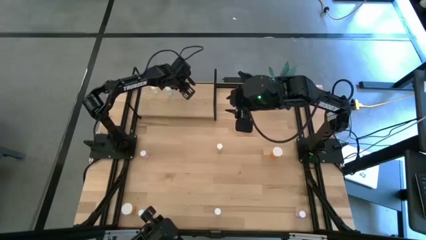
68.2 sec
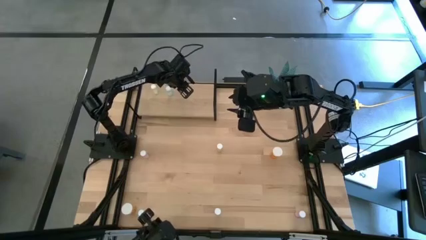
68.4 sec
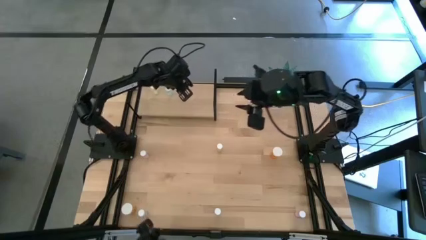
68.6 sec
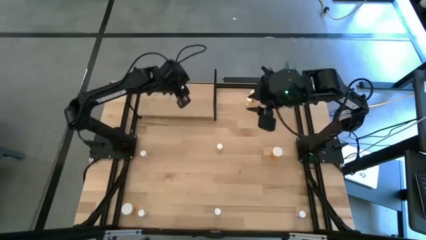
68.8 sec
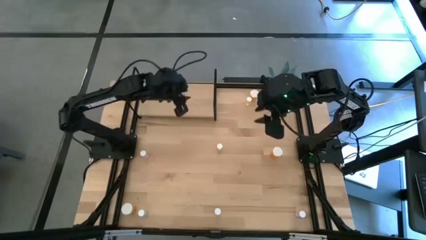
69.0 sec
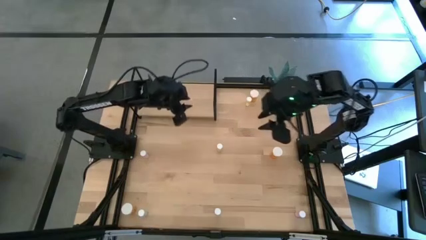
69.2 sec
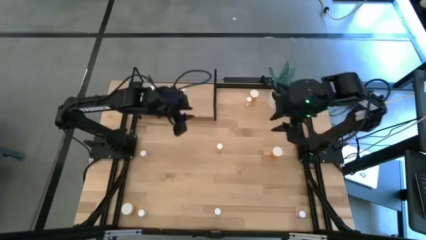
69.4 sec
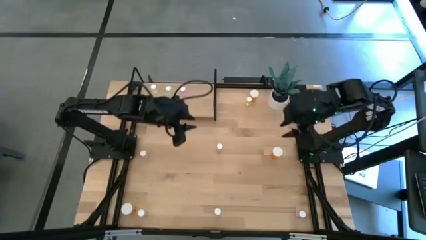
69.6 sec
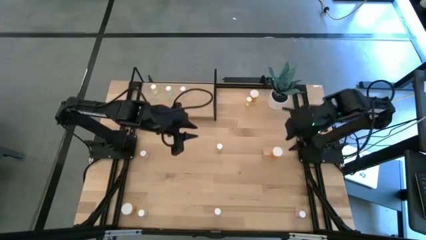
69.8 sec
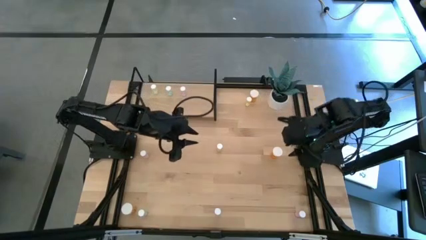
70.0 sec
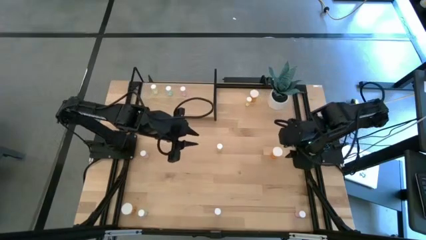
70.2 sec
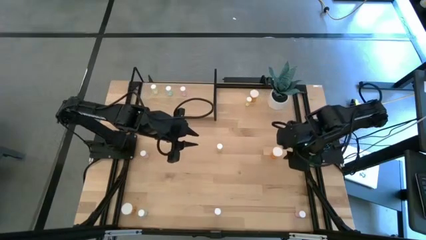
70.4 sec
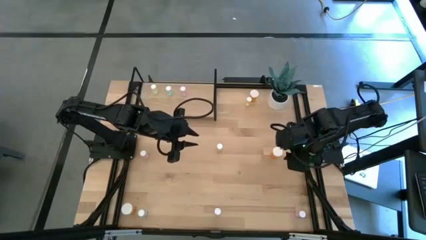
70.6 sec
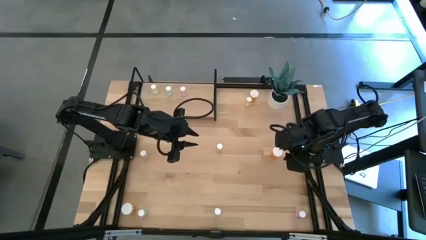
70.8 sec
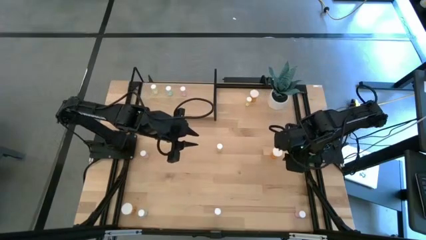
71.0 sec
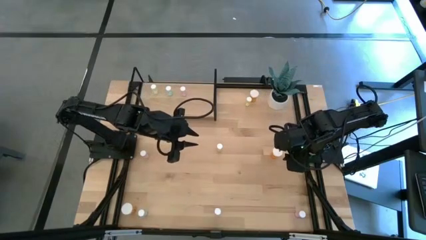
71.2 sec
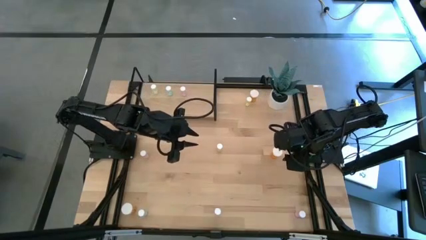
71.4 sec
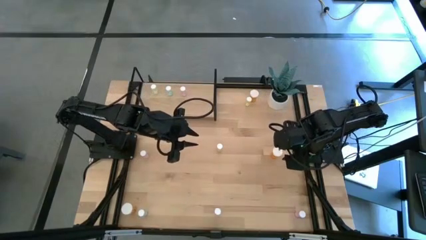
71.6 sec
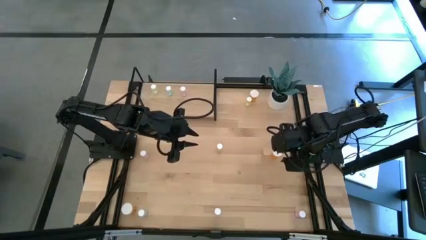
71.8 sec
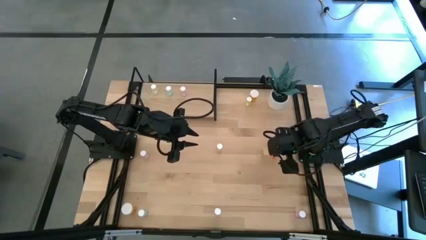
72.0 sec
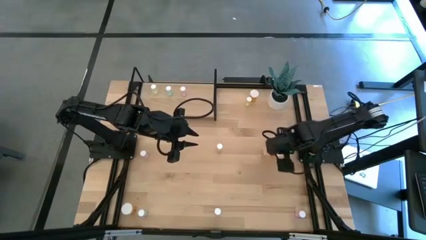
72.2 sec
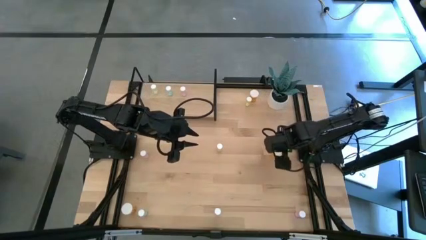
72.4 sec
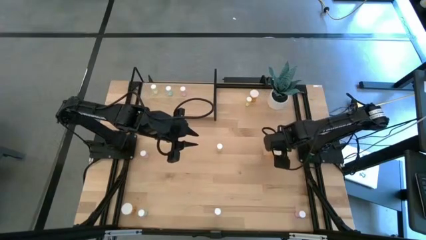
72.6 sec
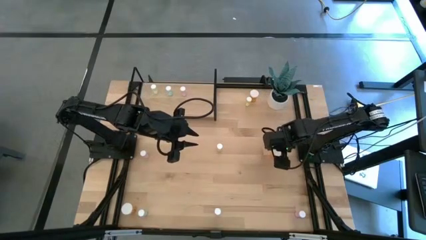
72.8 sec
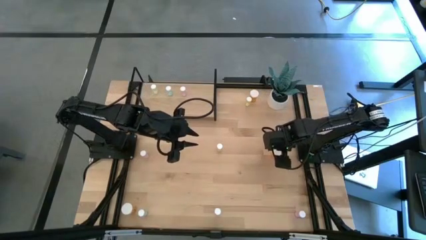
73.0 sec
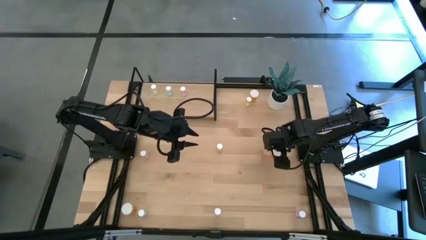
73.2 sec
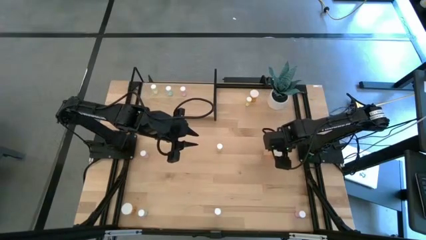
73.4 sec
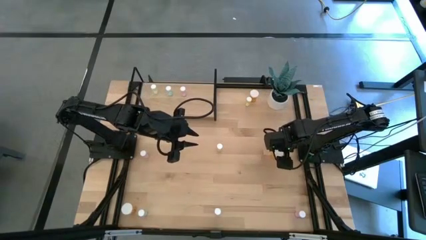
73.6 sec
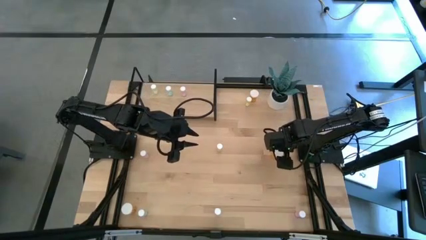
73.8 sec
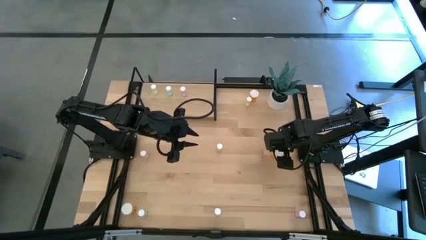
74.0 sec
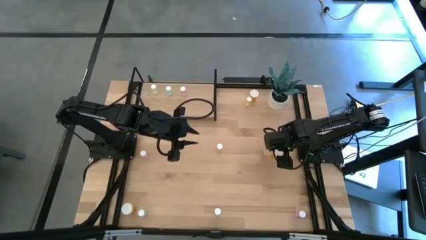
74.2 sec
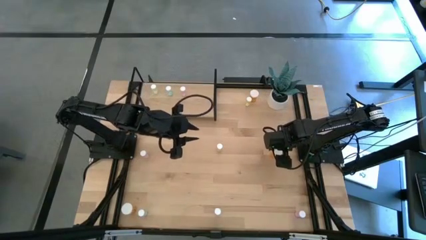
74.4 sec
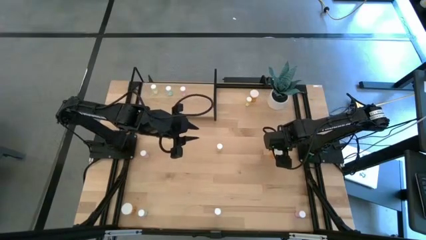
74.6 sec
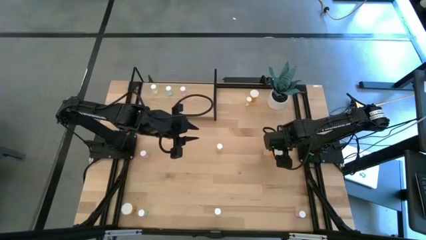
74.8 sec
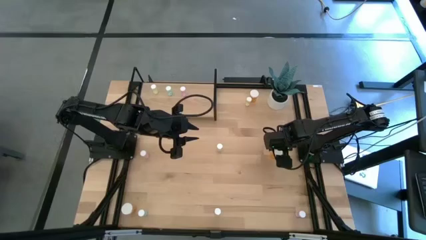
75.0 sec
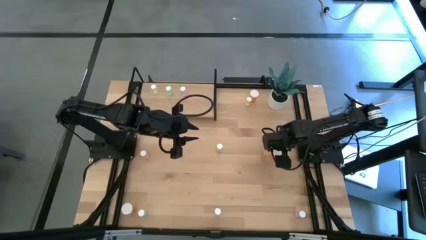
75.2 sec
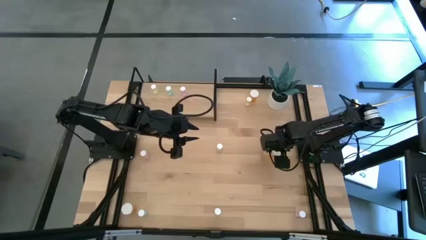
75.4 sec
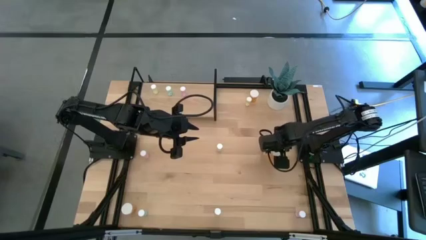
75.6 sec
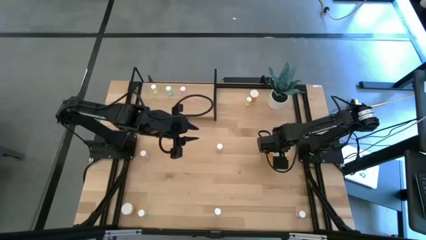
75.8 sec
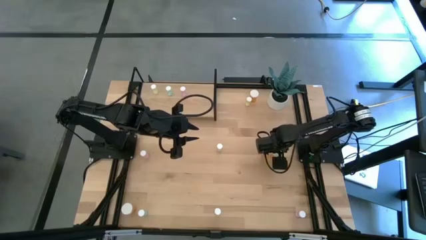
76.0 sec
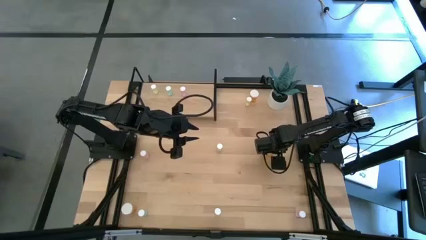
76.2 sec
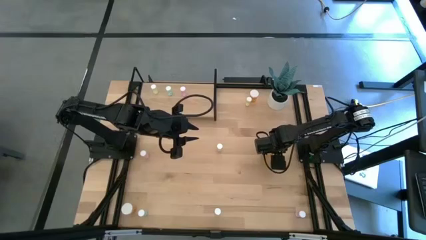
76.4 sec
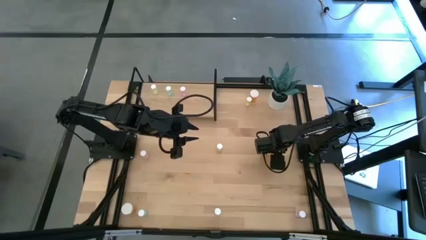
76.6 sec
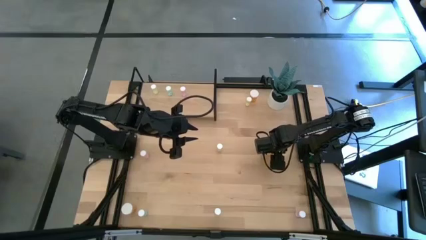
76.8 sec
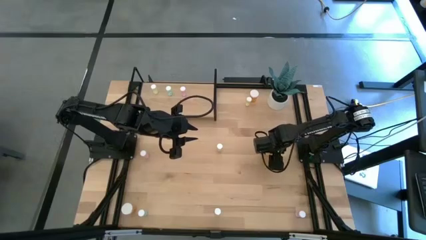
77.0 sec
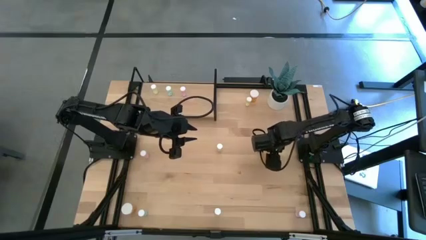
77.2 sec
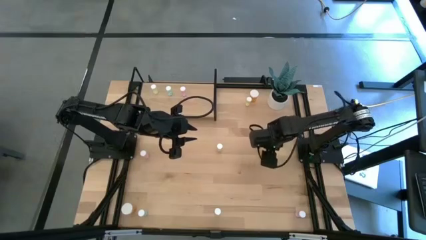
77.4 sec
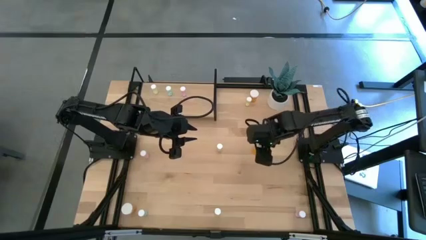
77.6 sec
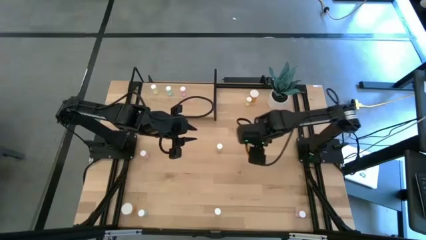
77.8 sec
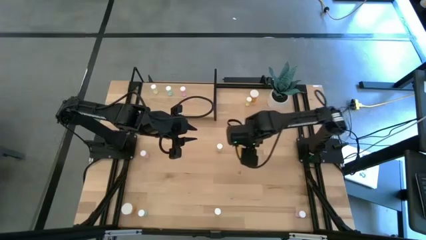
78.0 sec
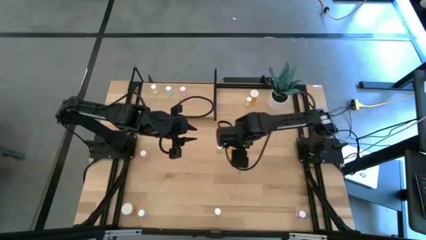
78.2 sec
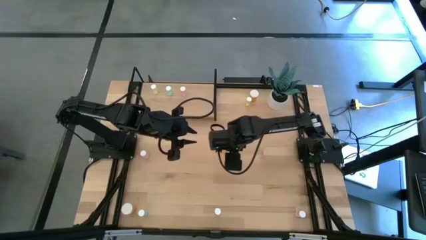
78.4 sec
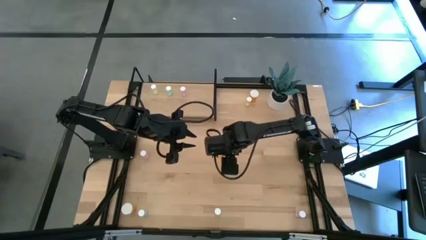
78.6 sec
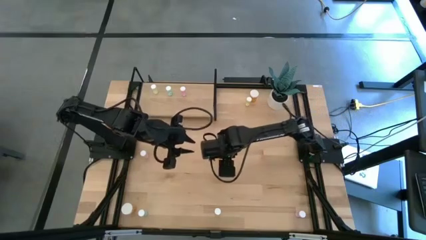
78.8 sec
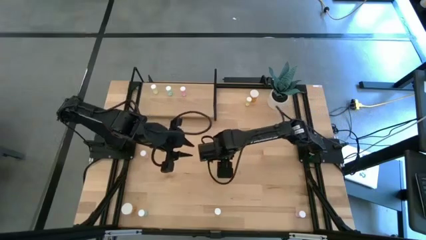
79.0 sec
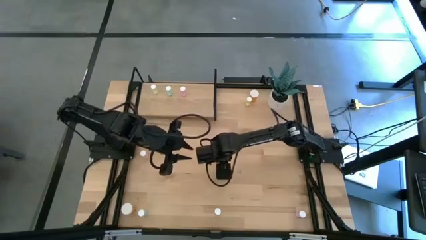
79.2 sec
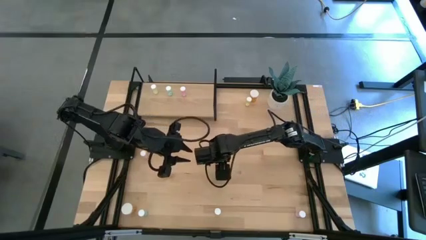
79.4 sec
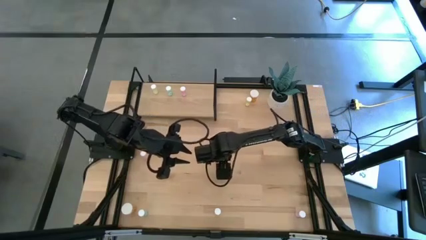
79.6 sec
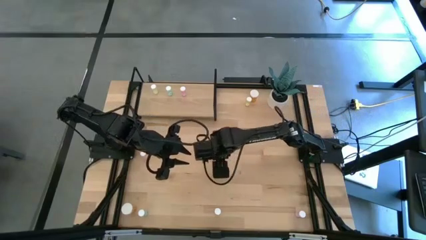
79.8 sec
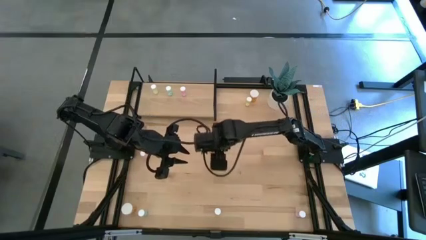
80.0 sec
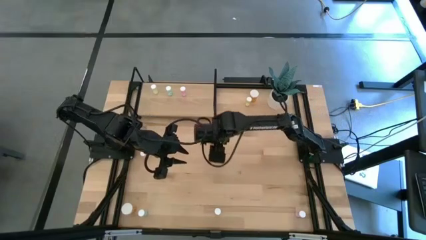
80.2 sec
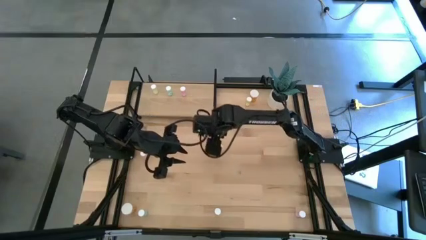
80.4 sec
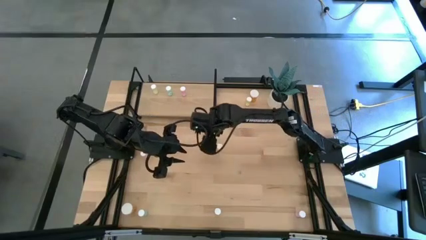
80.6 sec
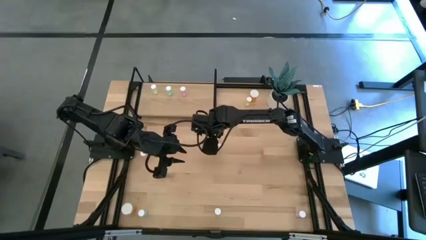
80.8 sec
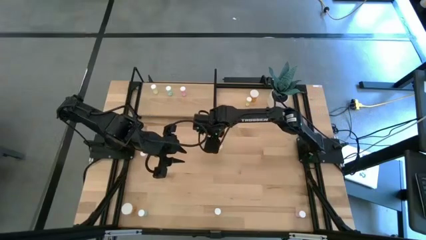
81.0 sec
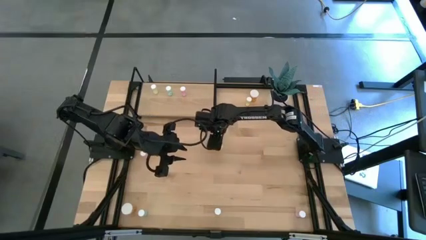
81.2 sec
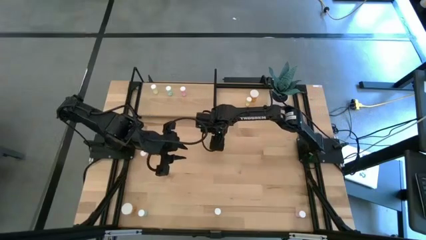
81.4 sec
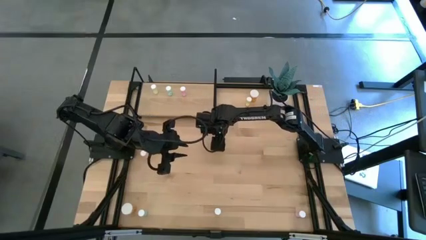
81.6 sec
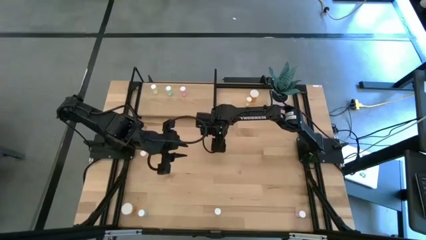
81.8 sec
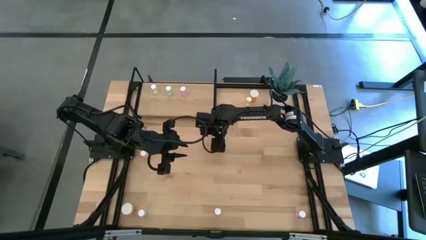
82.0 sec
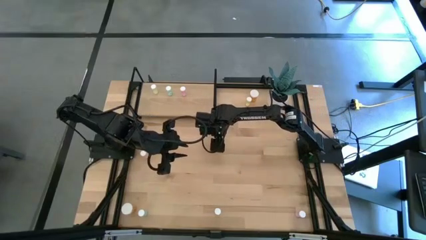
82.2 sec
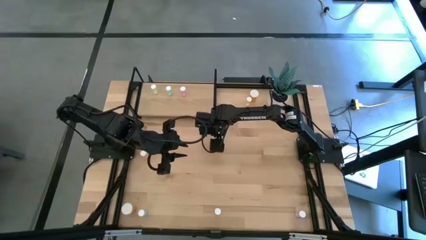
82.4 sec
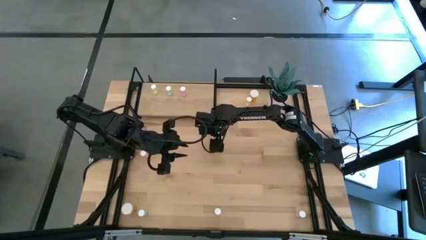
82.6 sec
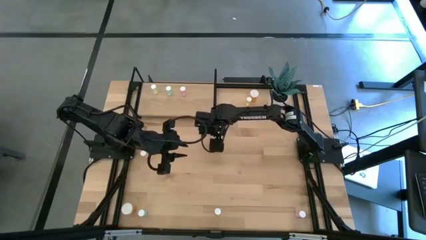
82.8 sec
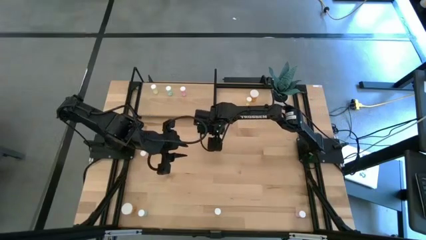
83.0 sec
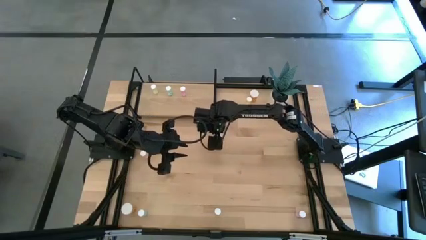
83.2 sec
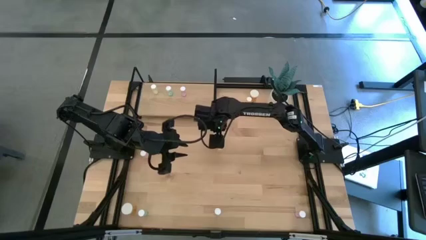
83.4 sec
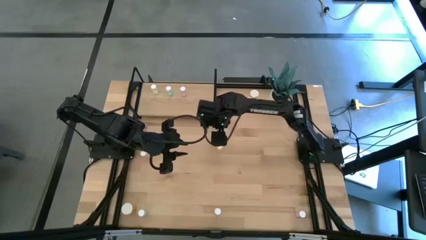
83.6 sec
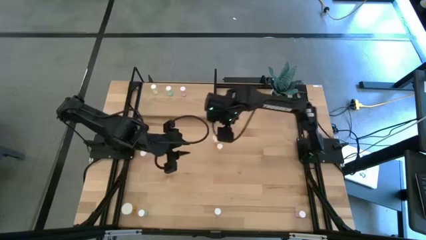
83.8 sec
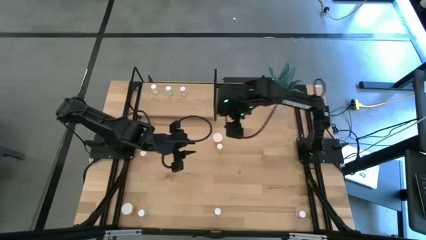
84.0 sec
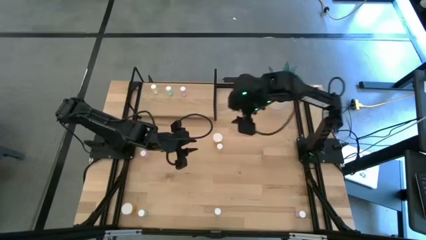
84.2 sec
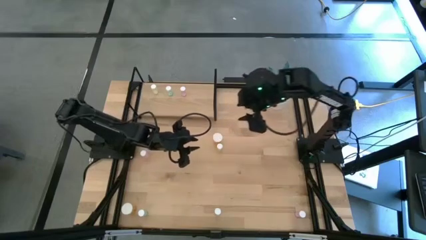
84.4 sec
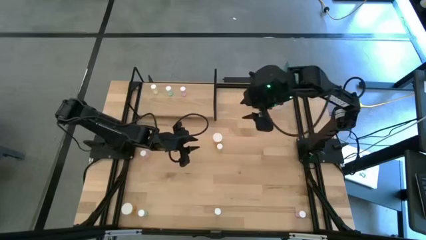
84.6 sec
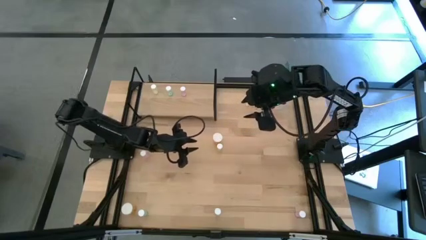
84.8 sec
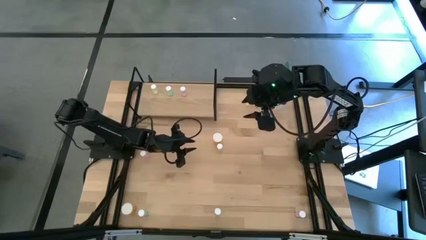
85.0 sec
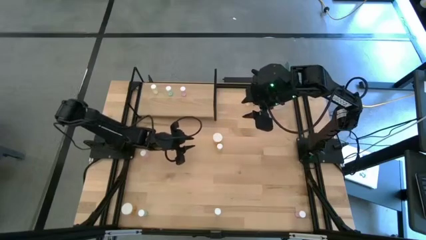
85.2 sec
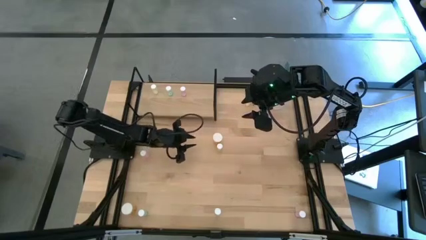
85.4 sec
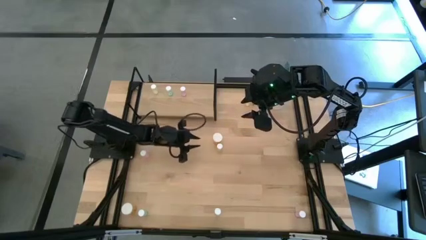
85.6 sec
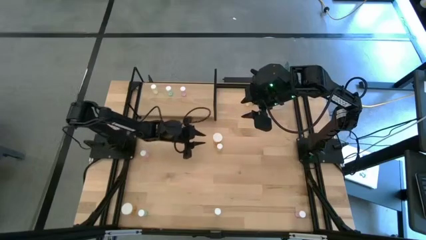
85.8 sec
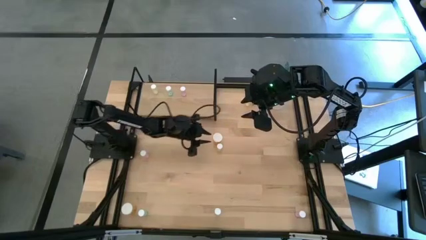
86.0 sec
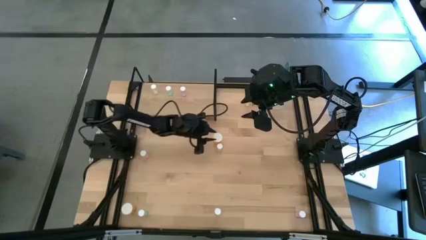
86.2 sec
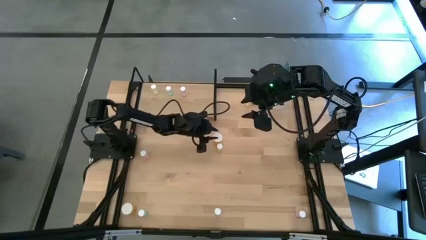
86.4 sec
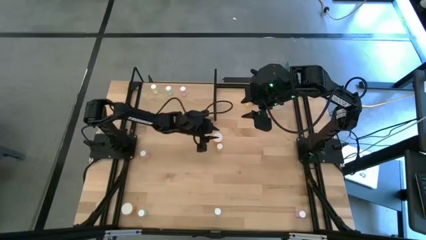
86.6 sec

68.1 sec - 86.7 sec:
Task: Pick and place medicine bottles onto shelf by color
Put the middle orange pill bottle on the shelf
